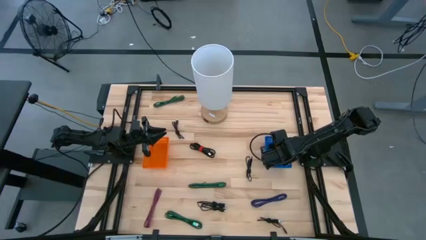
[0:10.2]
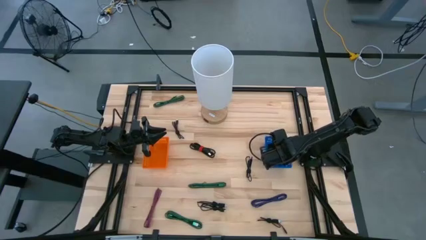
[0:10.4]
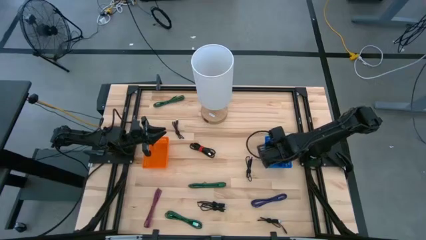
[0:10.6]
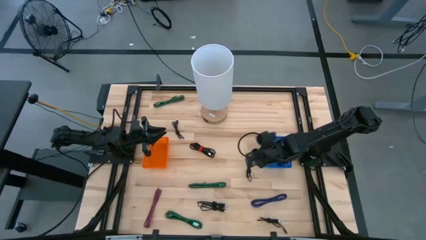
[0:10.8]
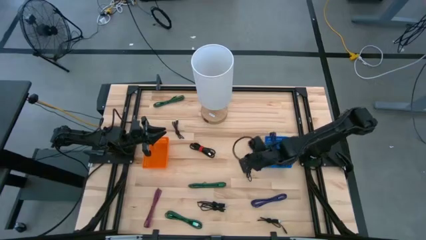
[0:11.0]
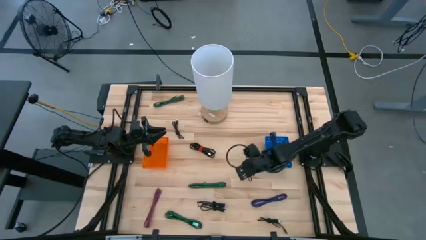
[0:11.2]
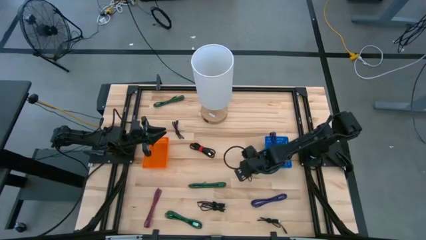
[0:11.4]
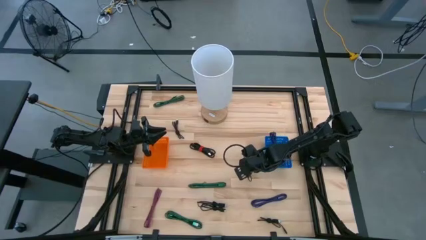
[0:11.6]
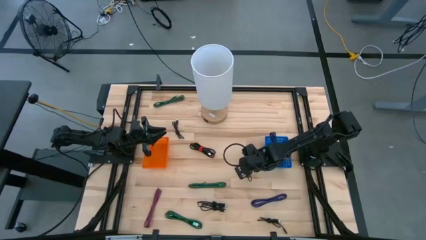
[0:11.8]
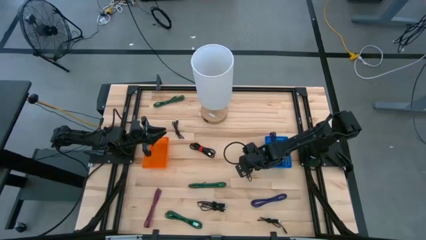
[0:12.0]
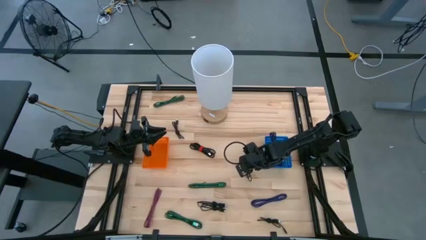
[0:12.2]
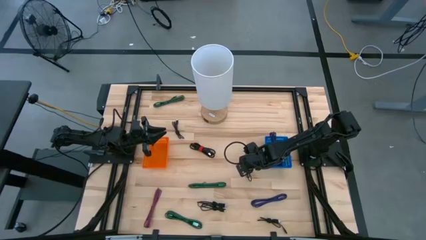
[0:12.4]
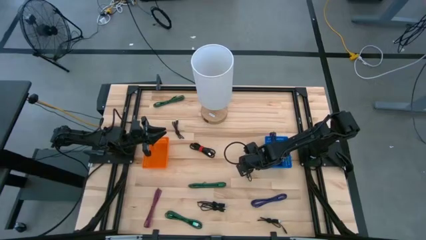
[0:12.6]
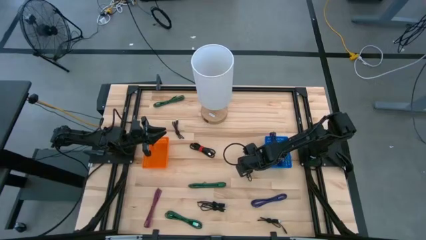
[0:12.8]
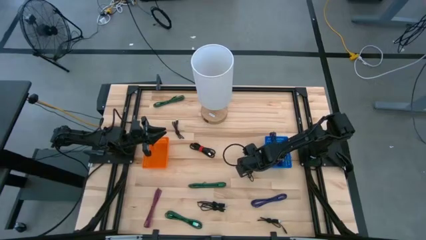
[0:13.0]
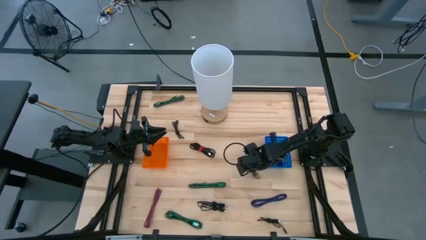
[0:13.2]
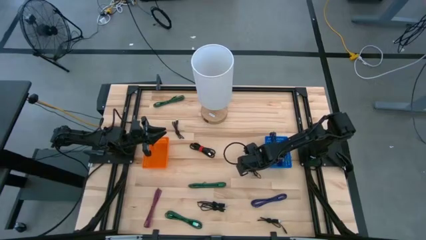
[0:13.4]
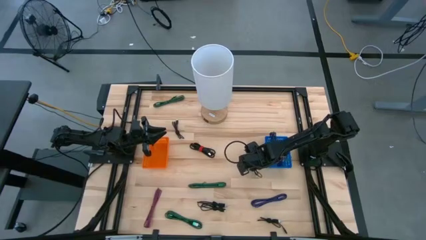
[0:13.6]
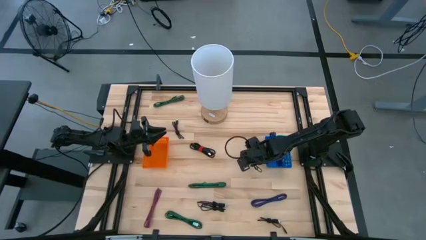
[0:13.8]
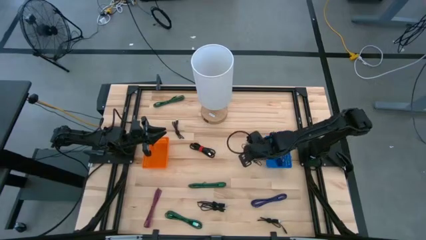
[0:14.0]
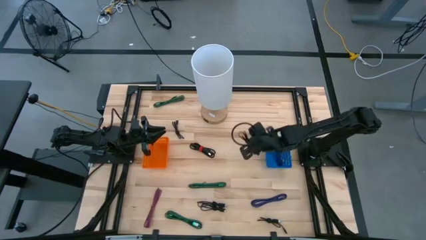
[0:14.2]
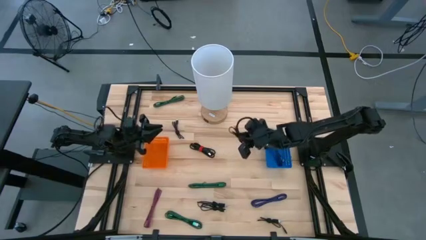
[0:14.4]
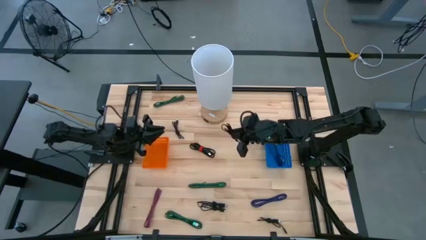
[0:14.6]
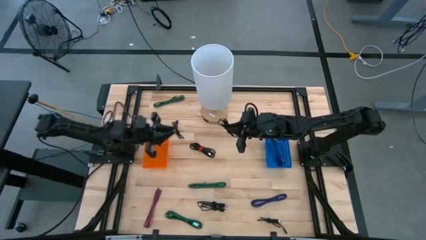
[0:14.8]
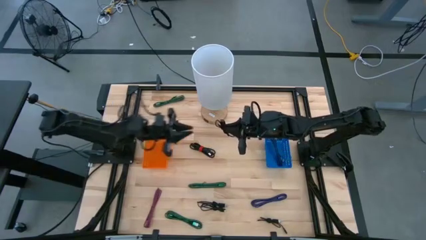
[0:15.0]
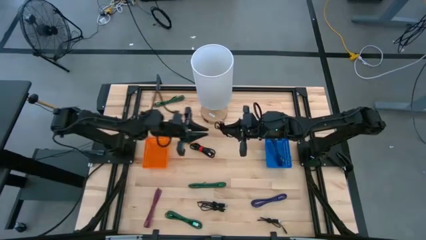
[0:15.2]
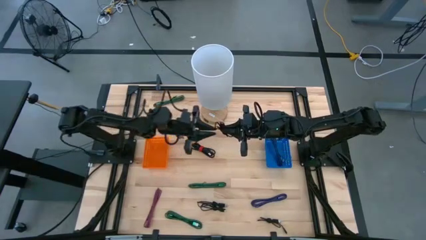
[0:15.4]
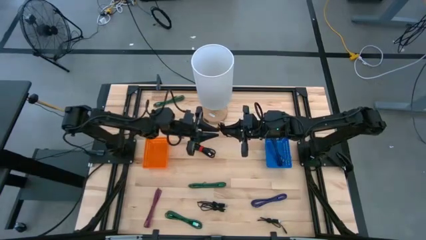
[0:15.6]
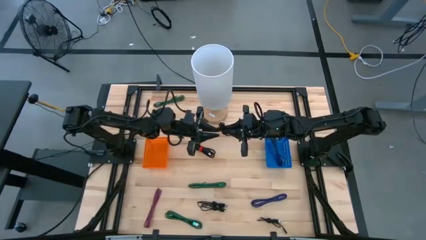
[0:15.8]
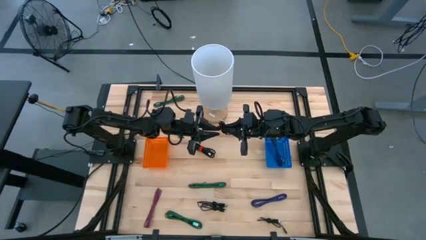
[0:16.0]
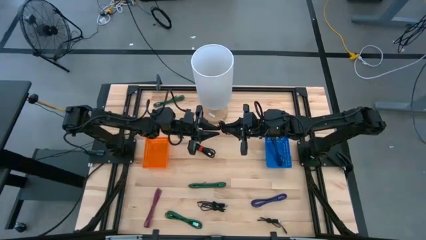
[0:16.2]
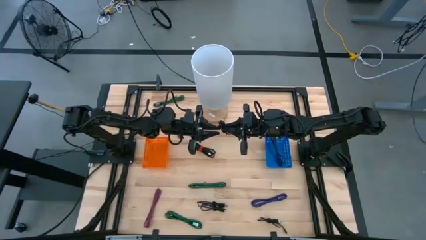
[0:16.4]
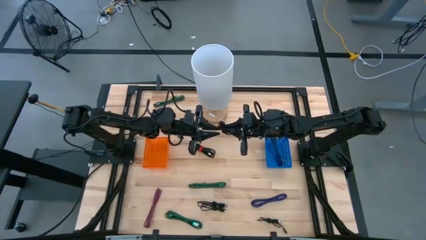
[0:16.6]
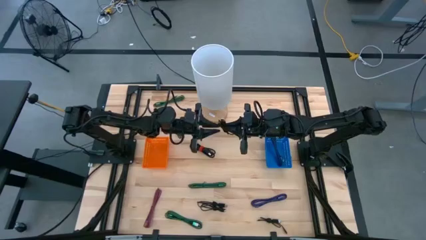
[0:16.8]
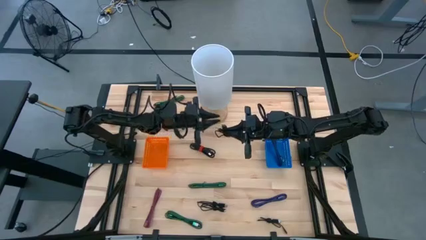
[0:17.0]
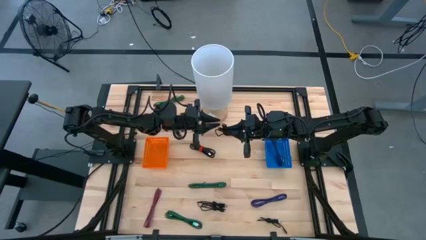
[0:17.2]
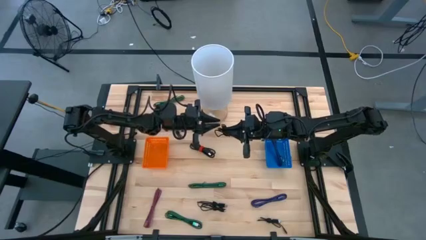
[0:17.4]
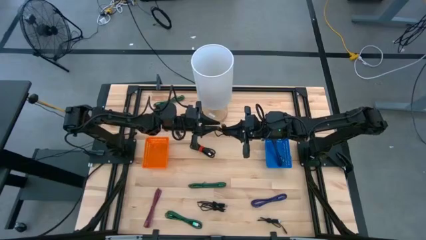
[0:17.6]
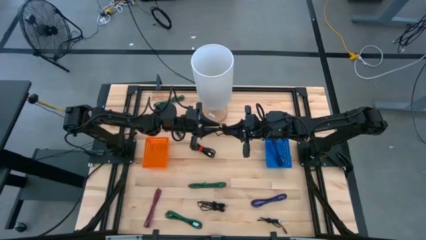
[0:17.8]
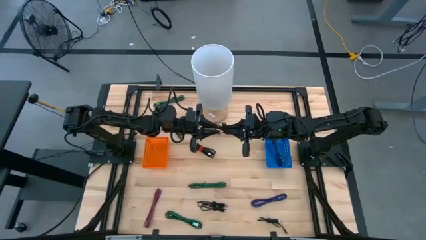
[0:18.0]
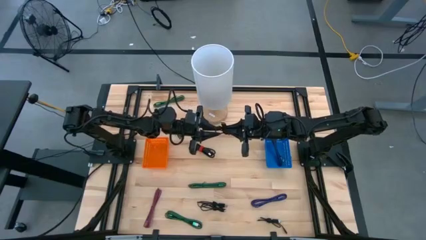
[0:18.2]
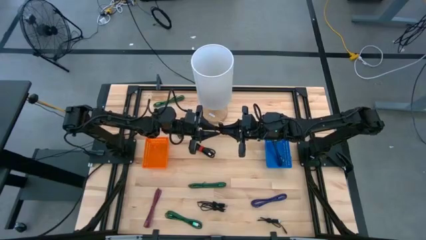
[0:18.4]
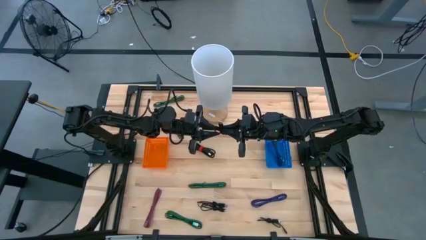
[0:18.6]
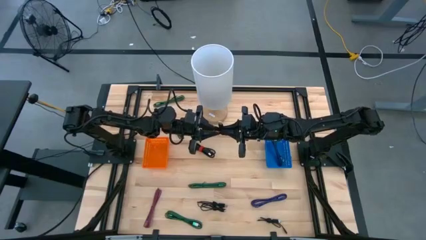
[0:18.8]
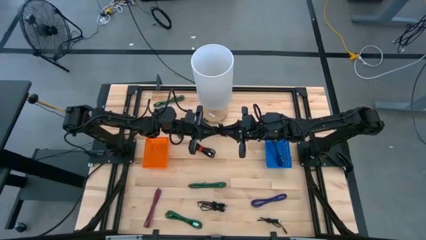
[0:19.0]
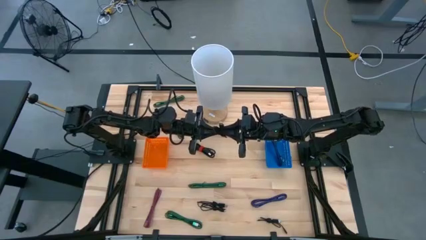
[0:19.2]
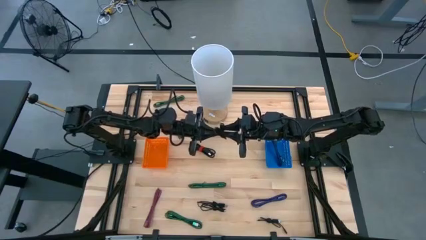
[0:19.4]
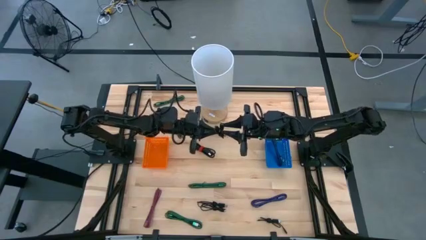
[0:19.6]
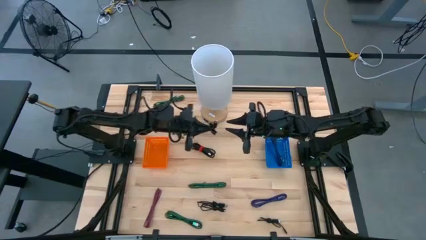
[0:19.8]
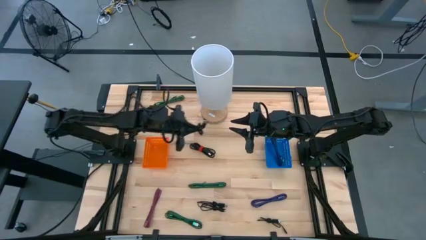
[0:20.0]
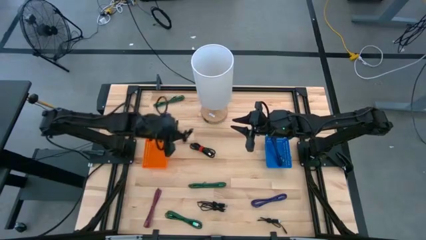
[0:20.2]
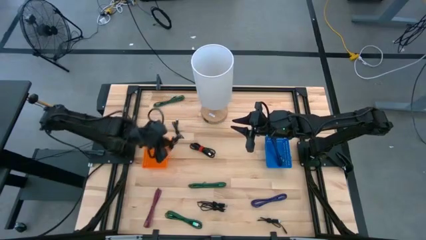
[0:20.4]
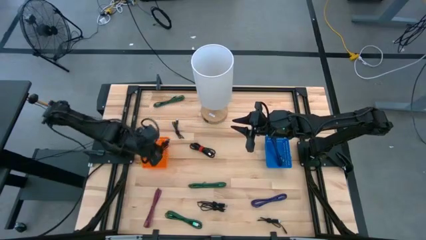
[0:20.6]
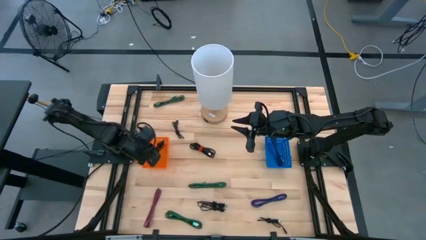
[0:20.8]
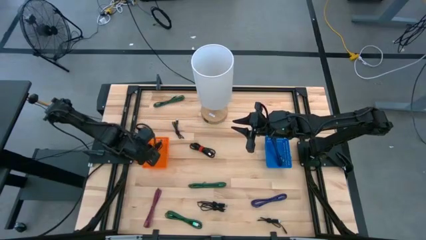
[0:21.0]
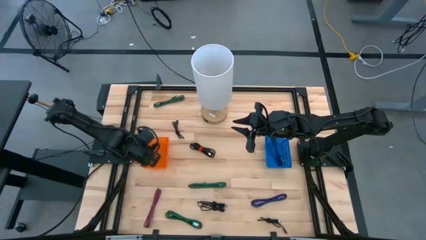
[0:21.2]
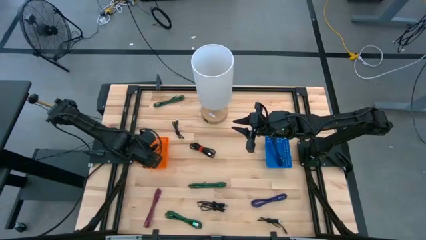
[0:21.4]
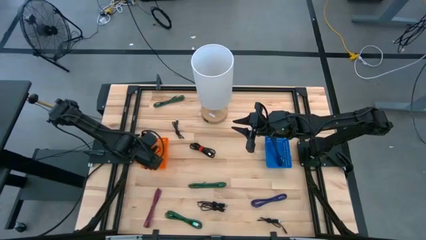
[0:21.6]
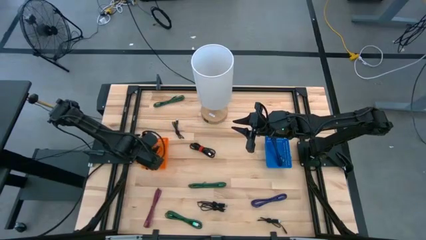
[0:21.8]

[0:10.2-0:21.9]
Task: Pick & Place USB Port
Put the black charger cable into the orange bin

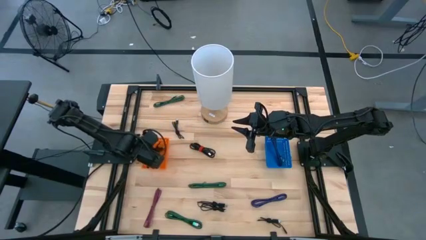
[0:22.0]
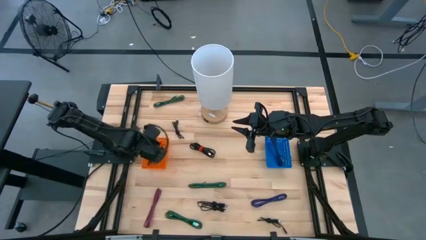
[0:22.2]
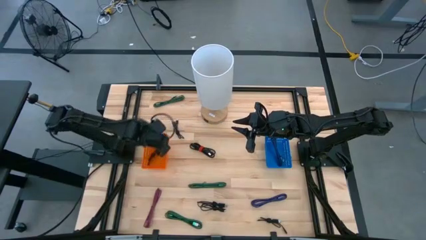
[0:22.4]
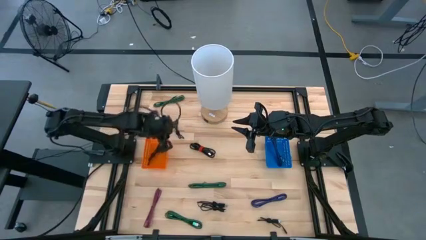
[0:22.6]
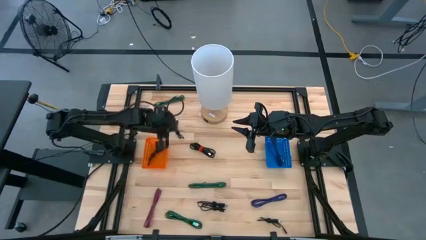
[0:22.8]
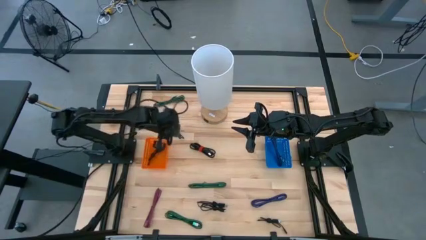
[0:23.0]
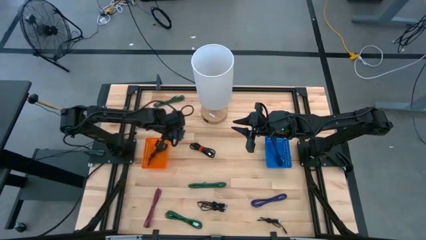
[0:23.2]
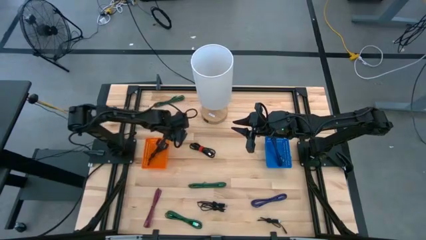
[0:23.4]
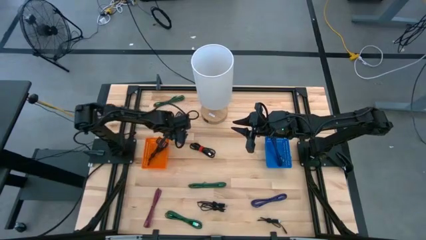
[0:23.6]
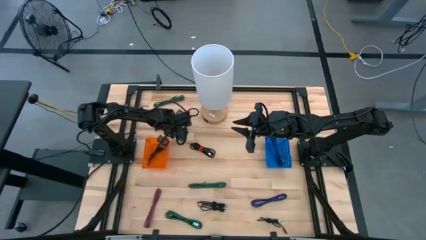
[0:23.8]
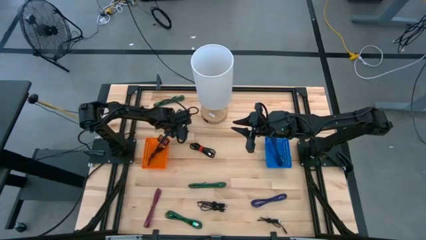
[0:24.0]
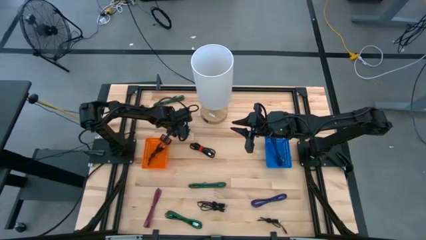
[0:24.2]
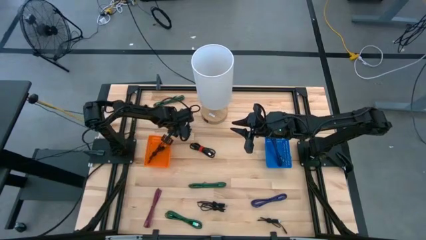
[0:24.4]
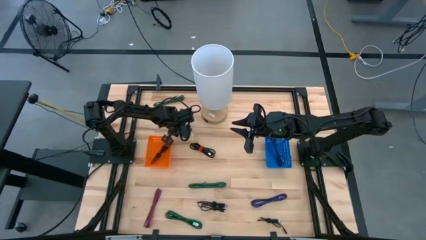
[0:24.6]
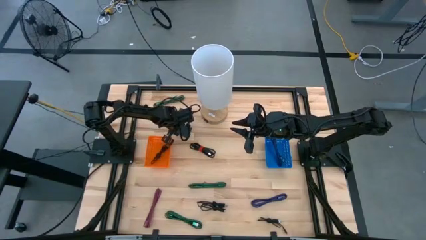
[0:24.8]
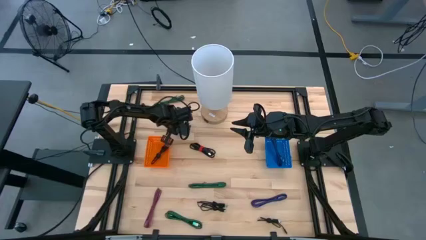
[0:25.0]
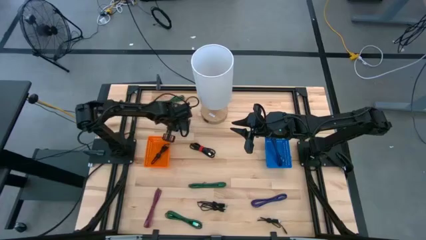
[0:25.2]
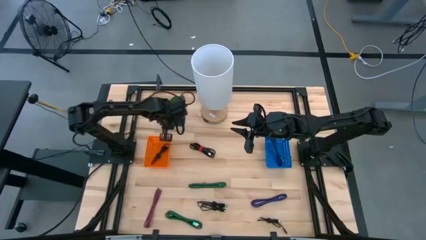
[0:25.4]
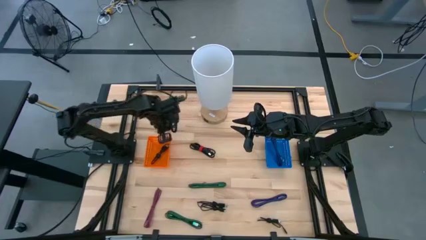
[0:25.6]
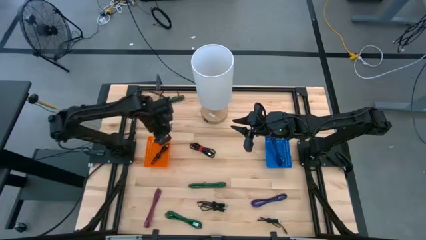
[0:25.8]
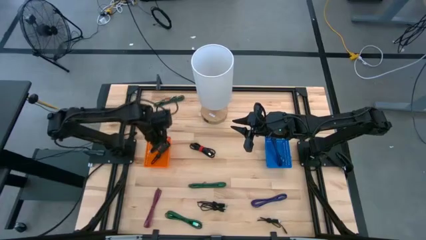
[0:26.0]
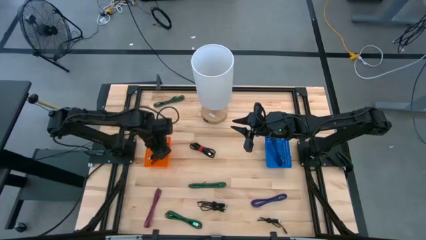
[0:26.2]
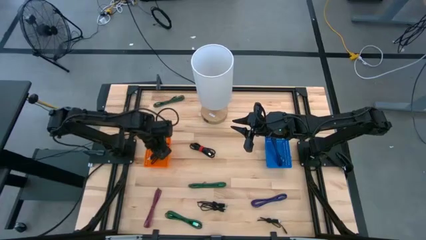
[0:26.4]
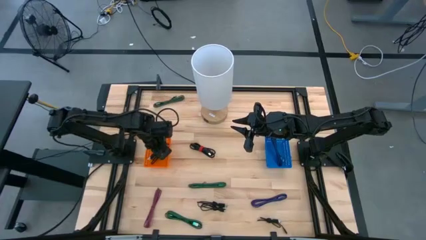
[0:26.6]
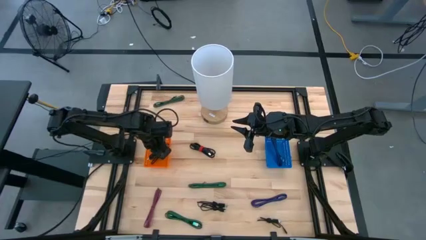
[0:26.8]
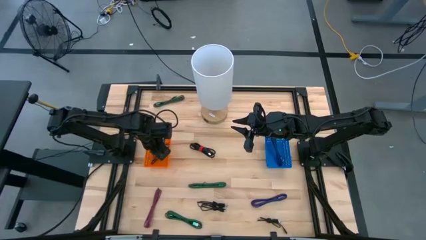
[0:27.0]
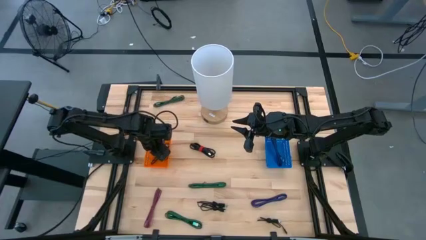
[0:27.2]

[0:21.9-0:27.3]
Put the black charger cable into the orange bin
